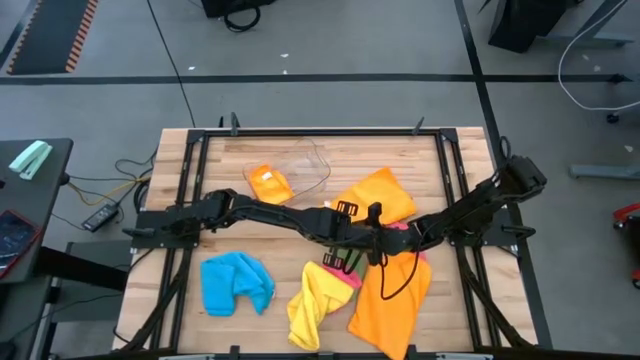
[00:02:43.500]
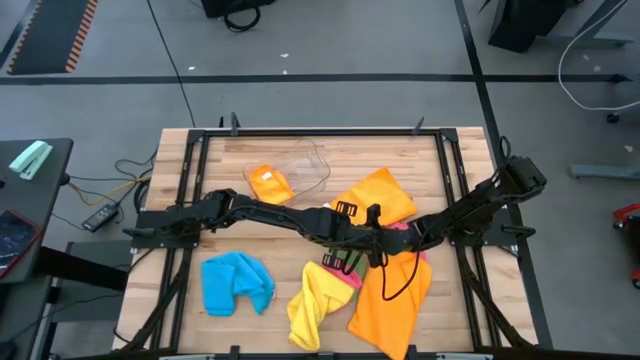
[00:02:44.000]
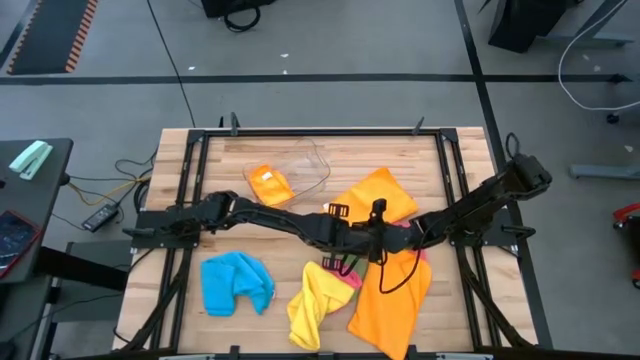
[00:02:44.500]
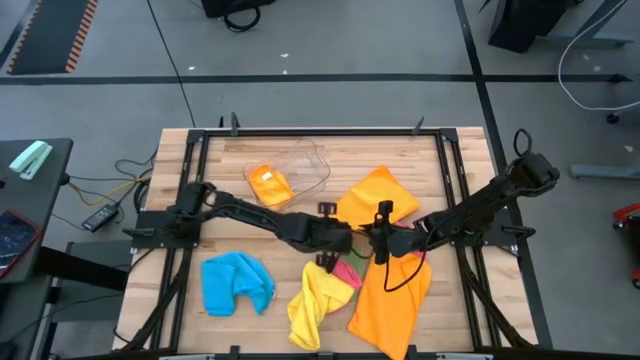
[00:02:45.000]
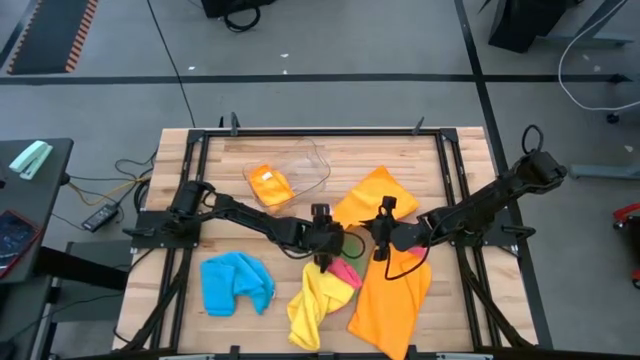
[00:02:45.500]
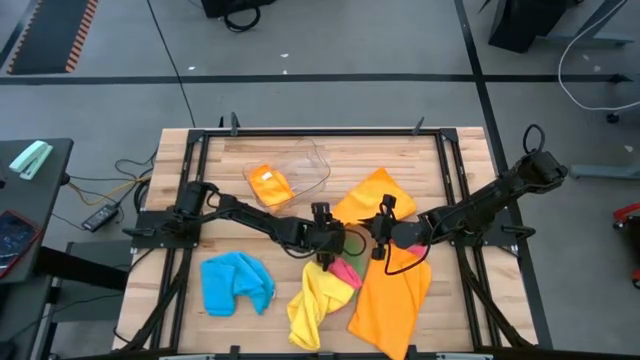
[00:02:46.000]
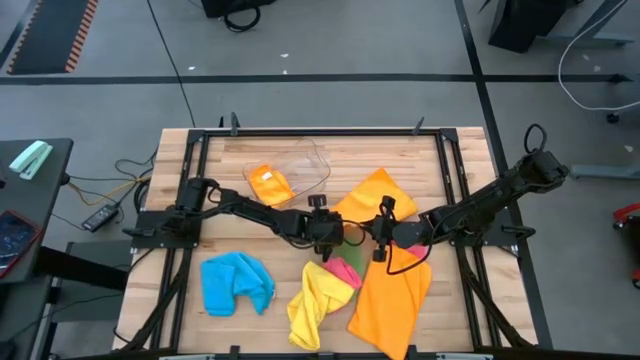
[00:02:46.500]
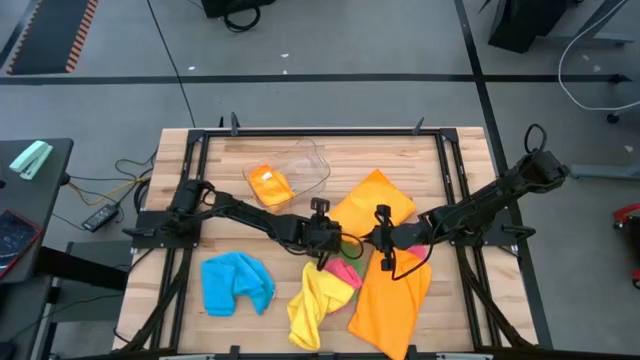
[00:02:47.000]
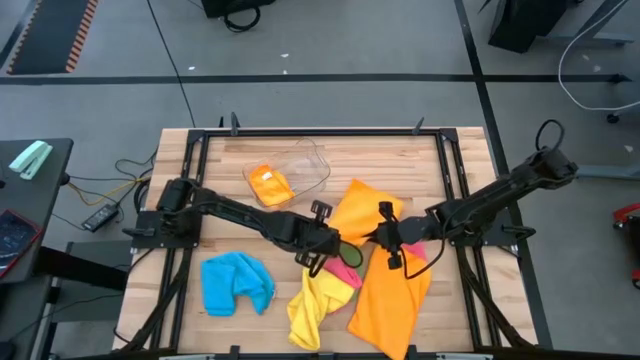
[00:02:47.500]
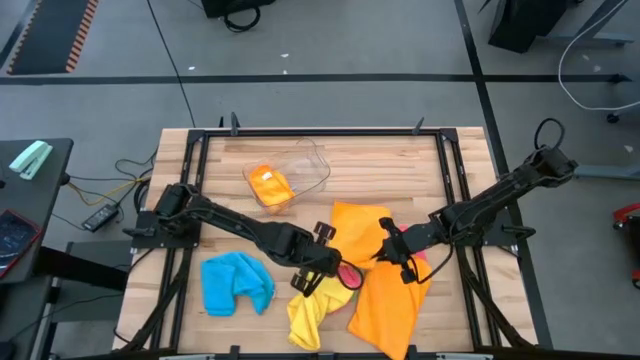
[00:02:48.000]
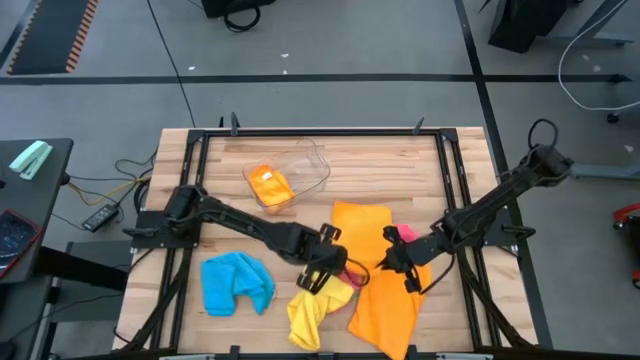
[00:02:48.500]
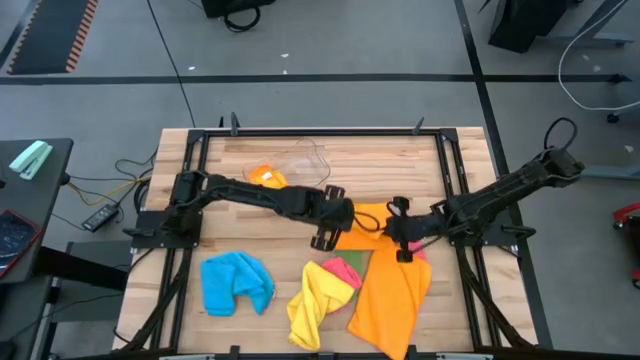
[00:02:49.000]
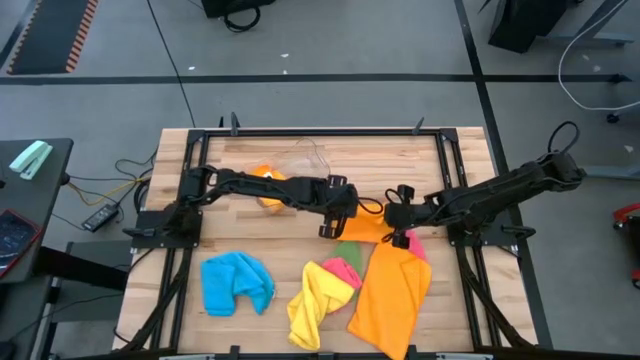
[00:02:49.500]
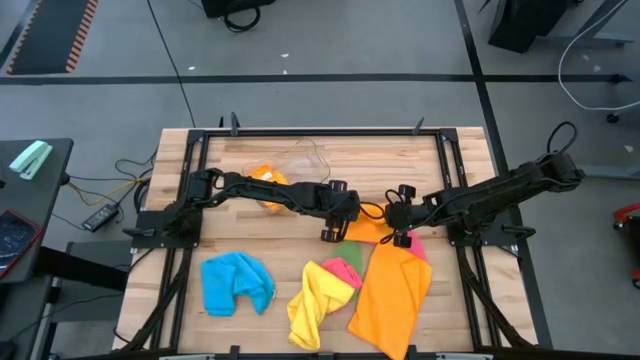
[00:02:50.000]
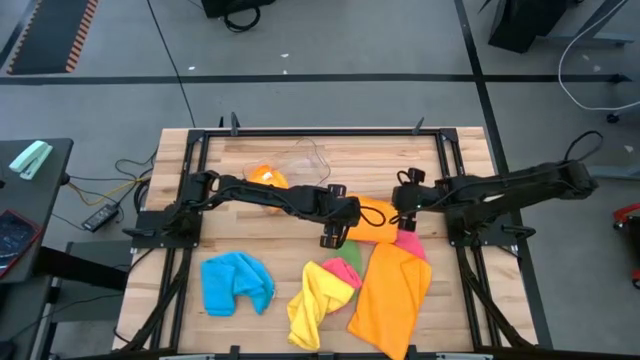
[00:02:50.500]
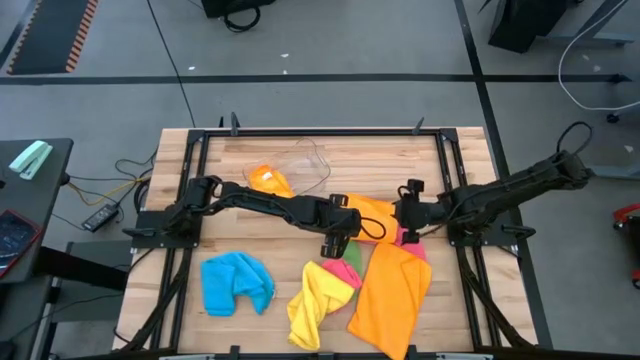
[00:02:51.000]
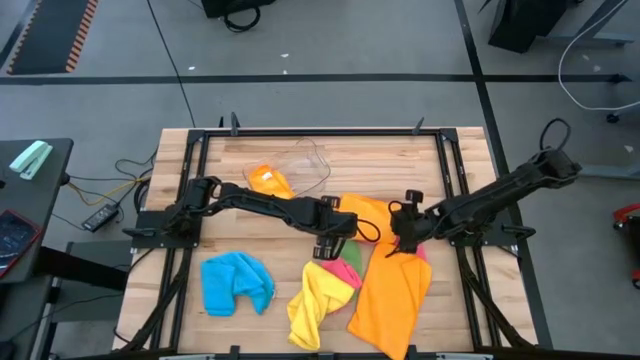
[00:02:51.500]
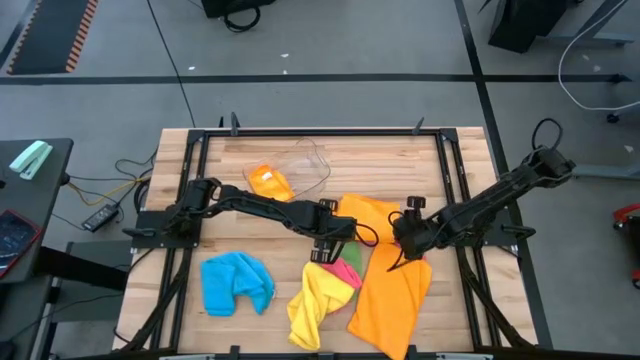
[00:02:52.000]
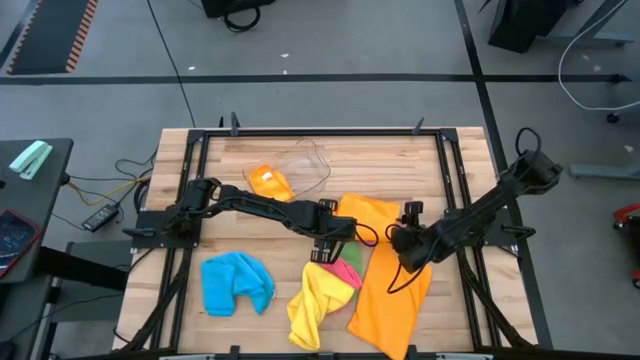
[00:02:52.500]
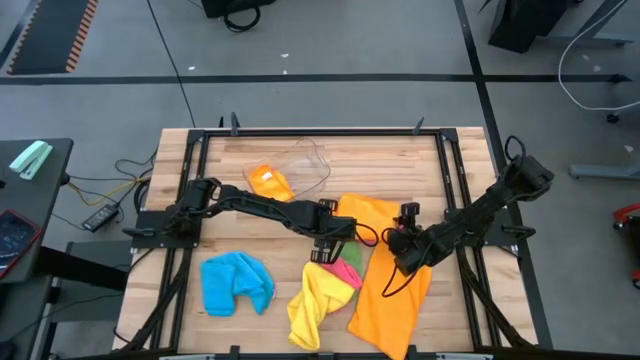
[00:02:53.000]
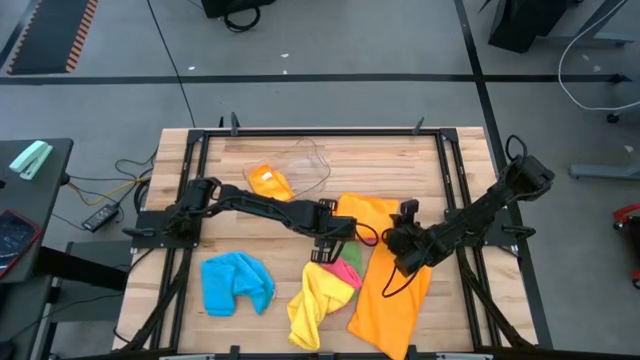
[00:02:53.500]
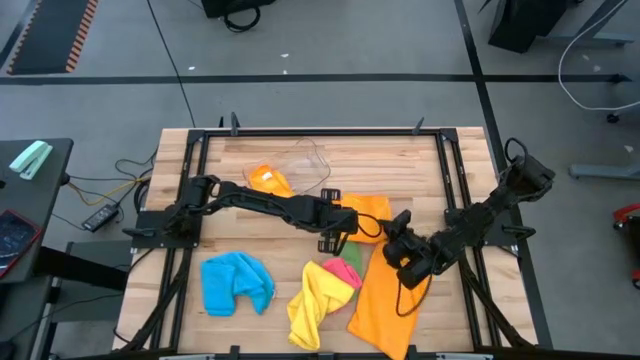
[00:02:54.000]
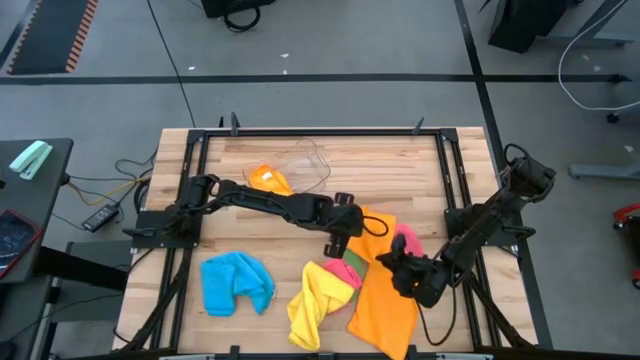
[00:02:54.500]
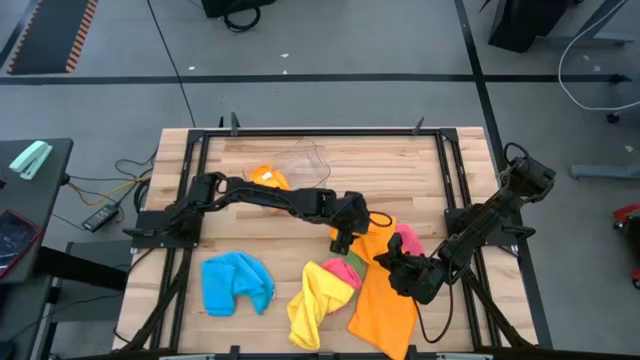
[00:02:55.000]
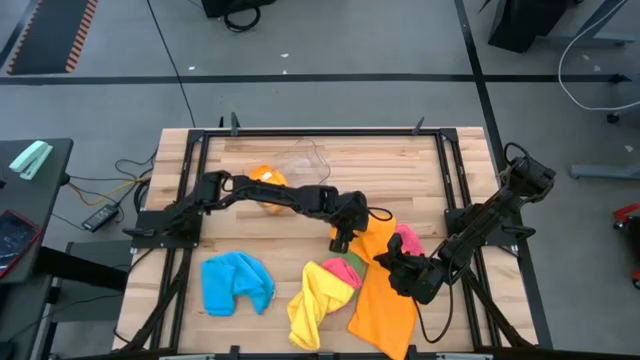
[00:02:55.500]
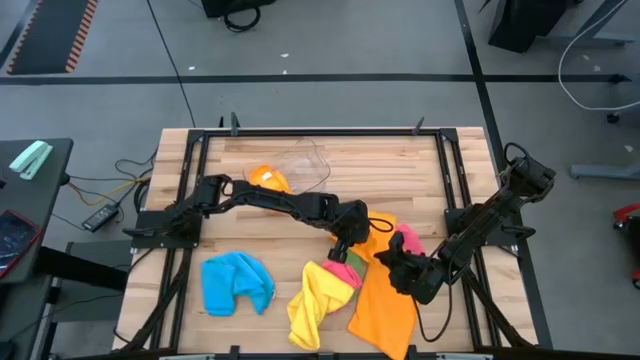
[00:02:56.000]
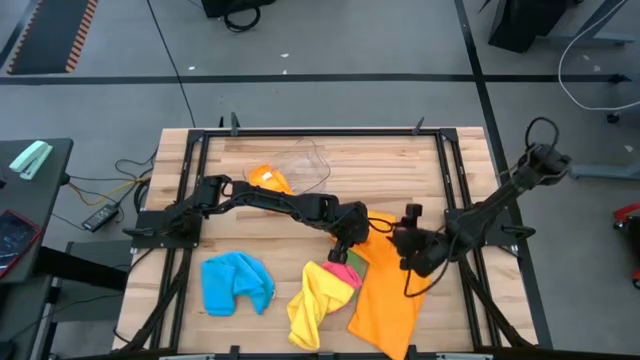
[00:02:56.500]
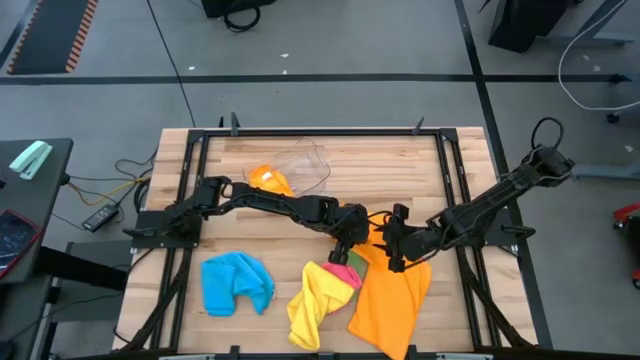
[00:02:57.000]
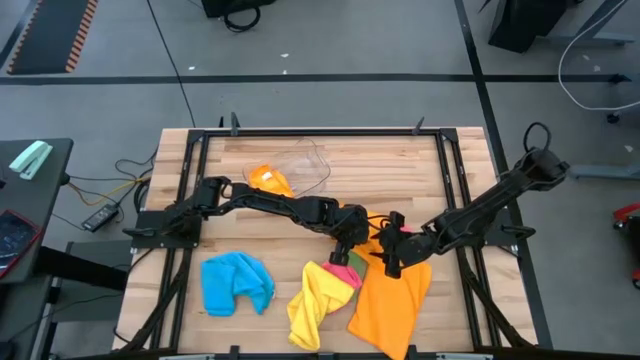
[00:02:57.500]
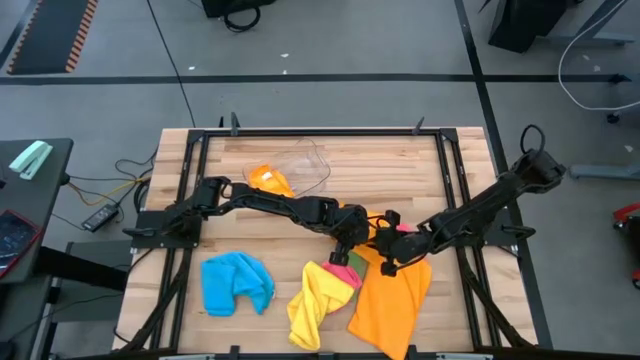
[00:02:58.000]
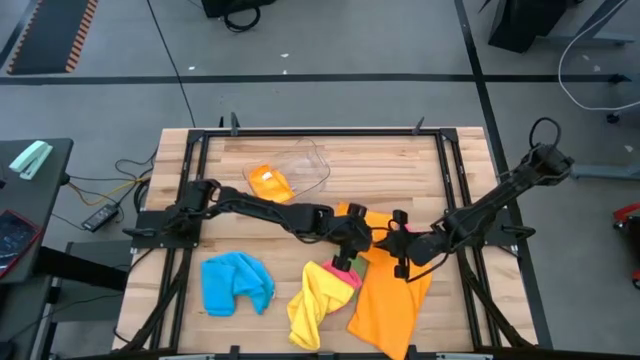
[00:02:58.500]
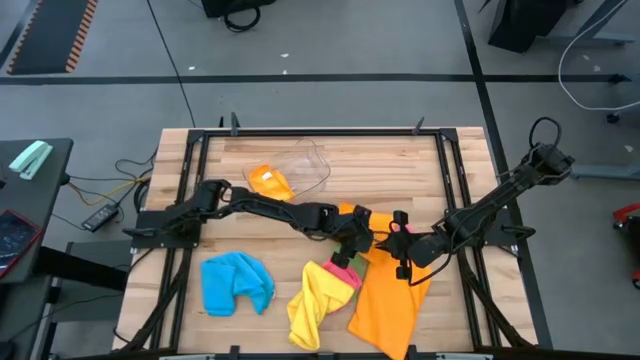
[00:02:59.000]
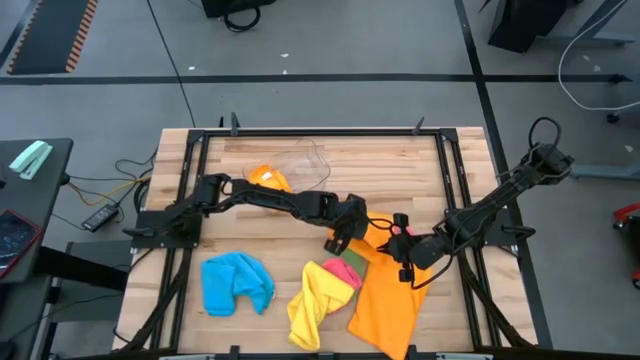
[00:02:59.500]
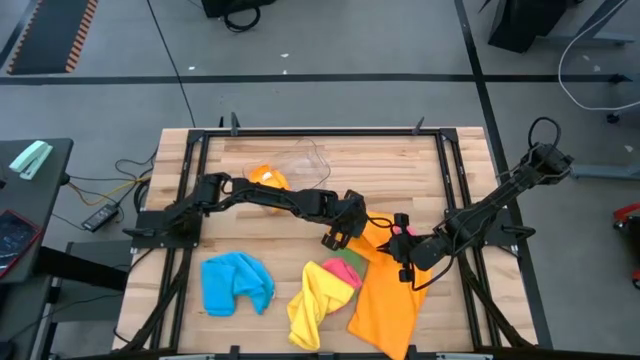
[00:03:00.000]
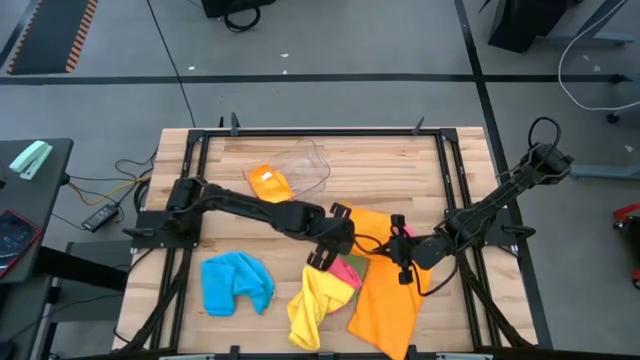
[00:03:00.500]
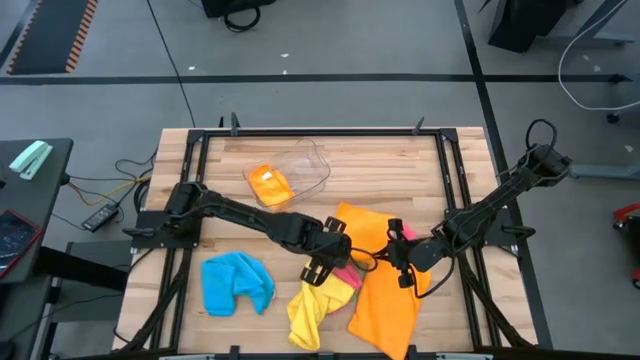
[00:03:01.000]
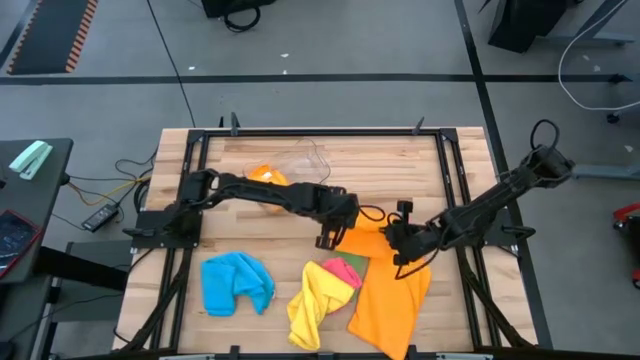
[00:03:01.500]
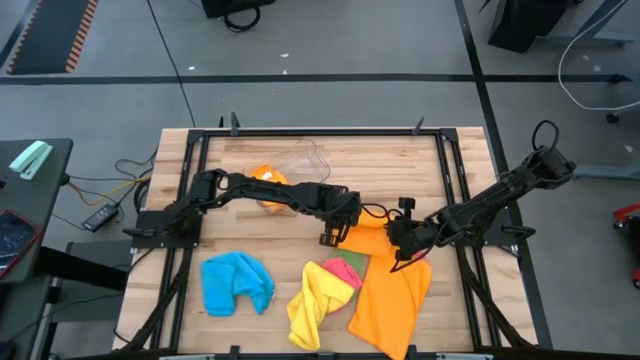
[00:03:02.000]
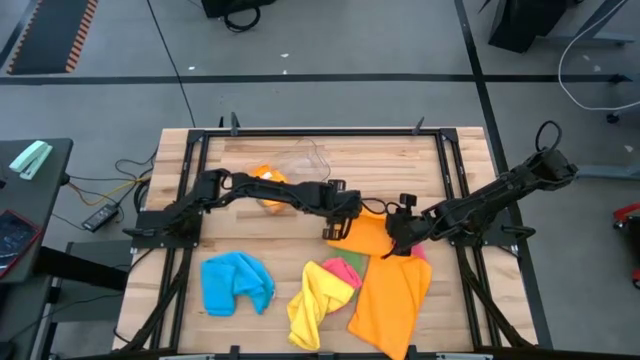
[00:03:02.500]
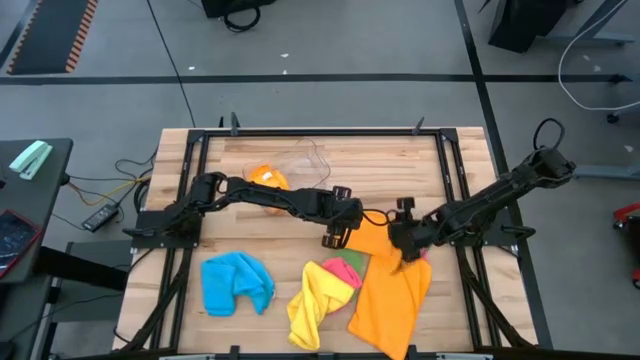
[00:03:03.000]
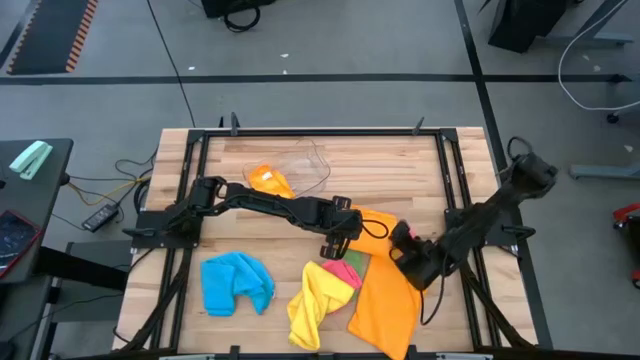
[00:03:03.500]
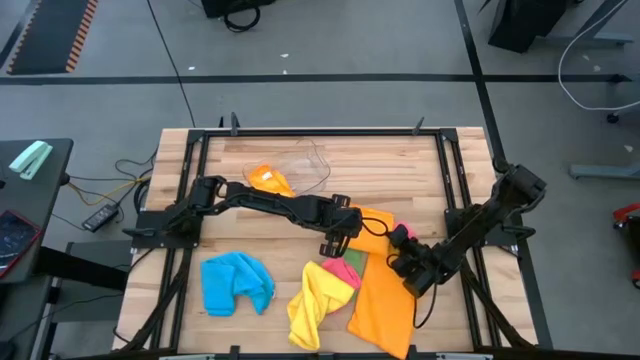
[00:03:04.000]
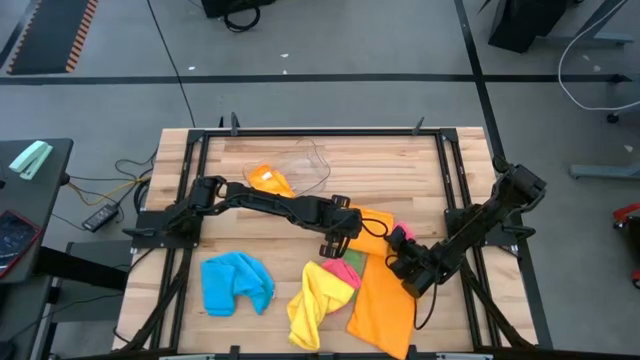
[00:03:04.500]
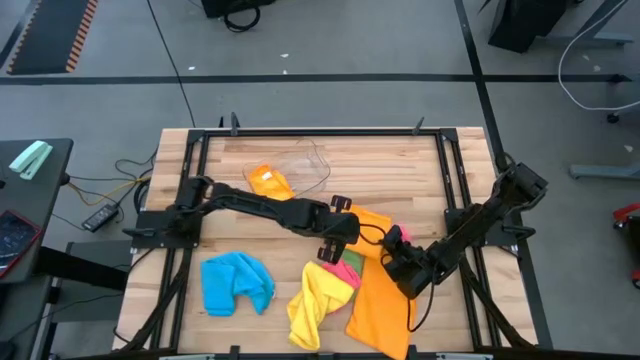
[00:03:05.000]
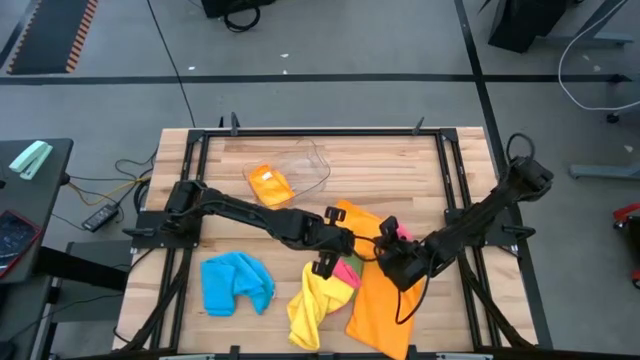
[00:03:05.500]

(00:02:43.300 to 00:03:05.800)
Task: Fold microfiber towels
Fold the orange microfiber towel
